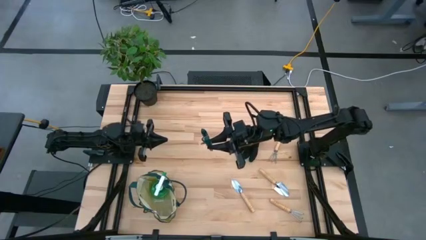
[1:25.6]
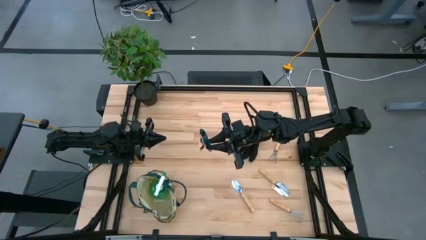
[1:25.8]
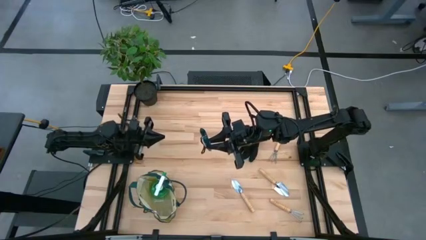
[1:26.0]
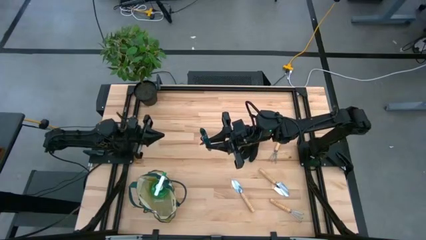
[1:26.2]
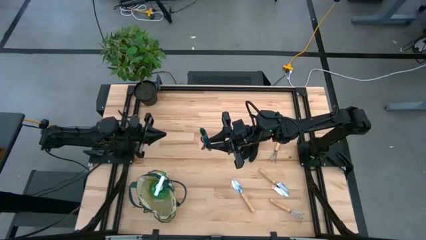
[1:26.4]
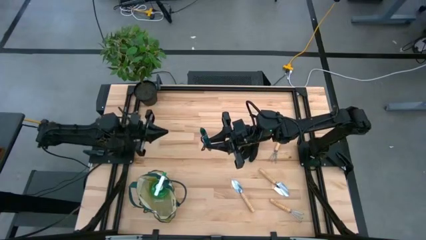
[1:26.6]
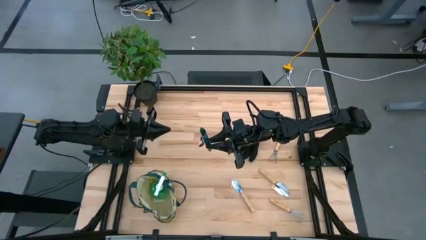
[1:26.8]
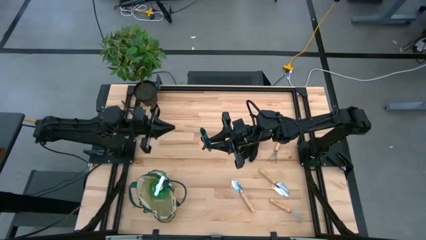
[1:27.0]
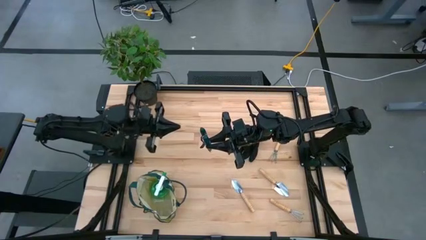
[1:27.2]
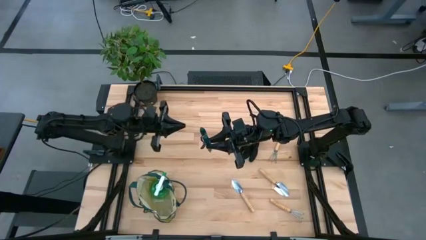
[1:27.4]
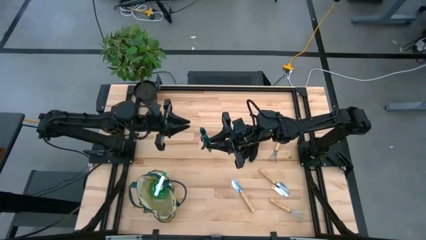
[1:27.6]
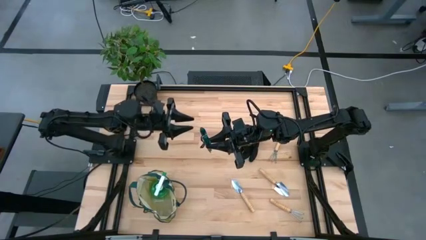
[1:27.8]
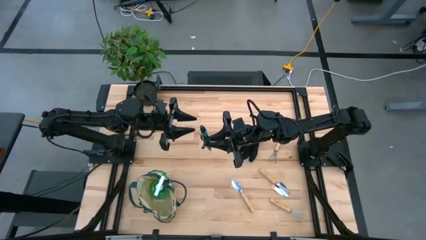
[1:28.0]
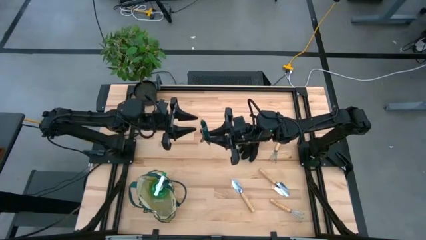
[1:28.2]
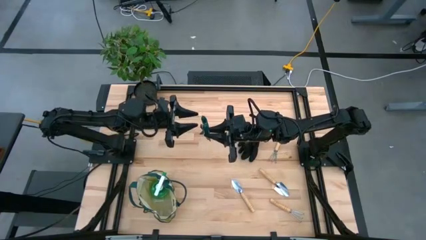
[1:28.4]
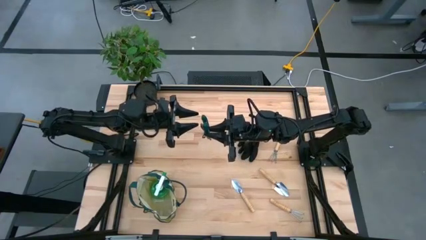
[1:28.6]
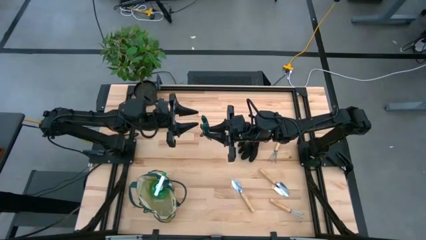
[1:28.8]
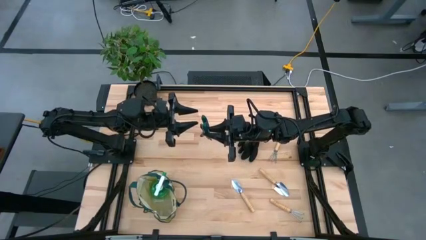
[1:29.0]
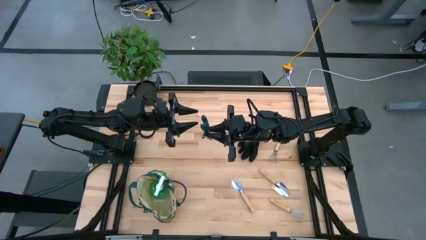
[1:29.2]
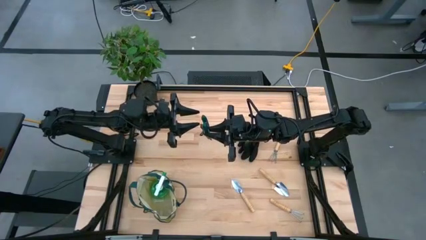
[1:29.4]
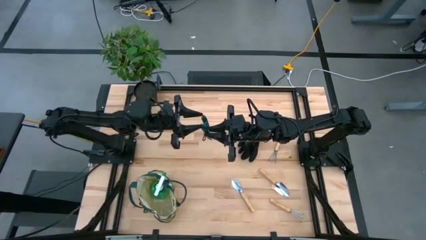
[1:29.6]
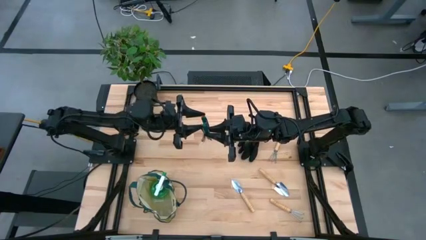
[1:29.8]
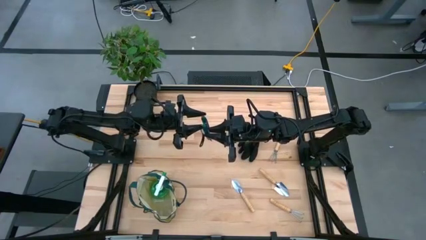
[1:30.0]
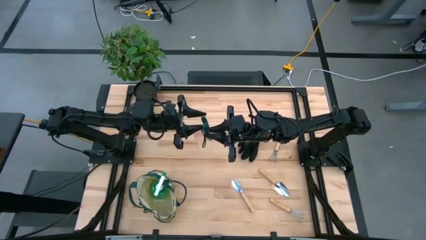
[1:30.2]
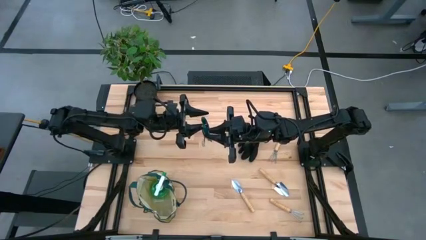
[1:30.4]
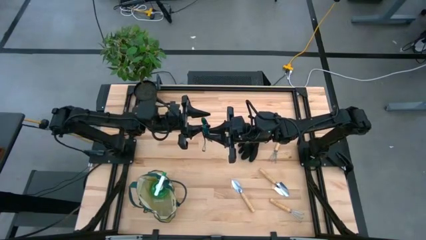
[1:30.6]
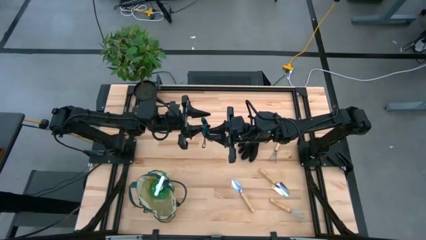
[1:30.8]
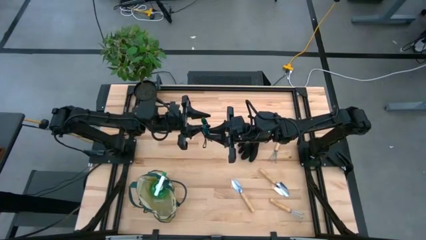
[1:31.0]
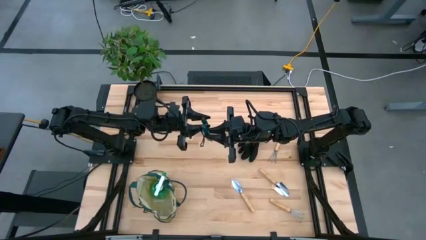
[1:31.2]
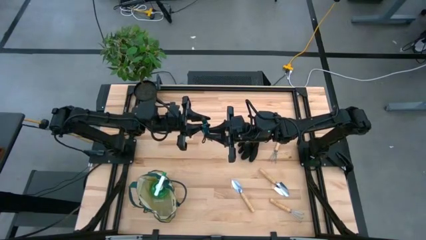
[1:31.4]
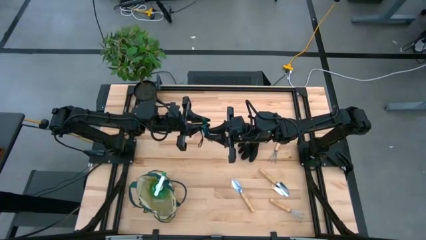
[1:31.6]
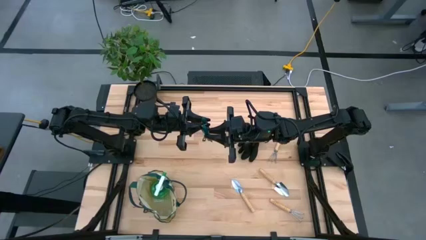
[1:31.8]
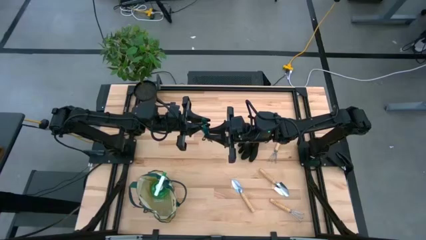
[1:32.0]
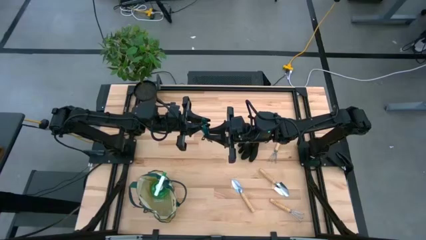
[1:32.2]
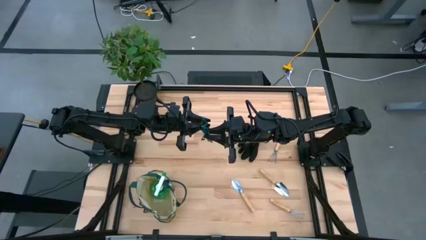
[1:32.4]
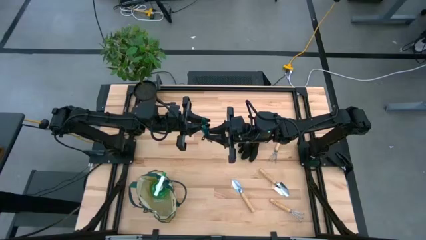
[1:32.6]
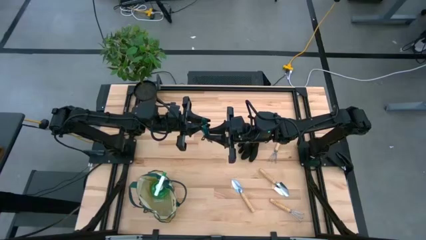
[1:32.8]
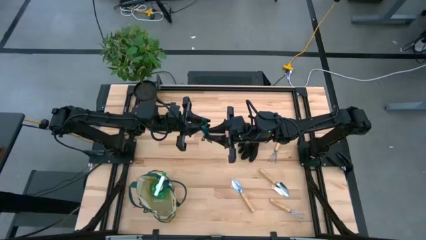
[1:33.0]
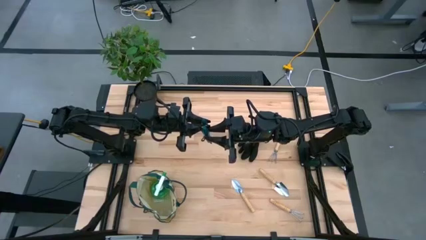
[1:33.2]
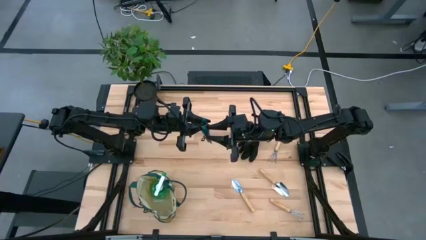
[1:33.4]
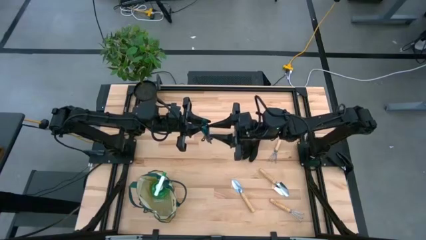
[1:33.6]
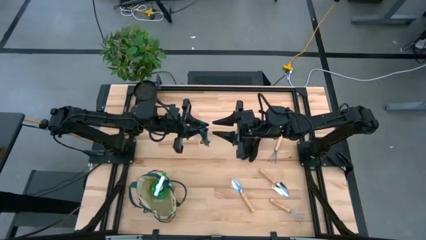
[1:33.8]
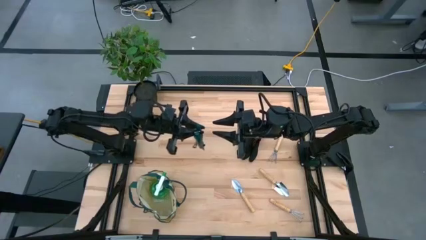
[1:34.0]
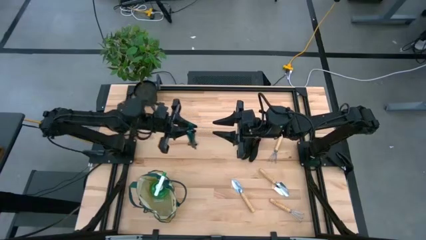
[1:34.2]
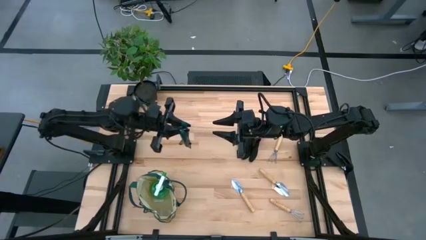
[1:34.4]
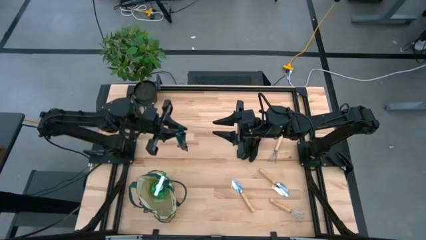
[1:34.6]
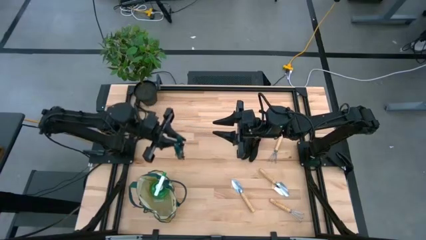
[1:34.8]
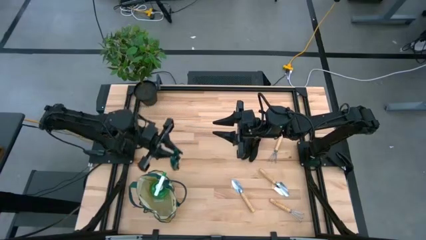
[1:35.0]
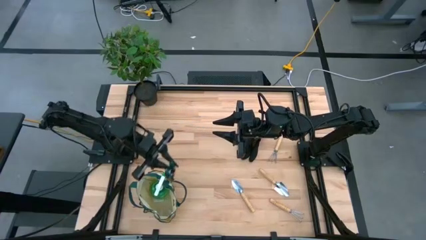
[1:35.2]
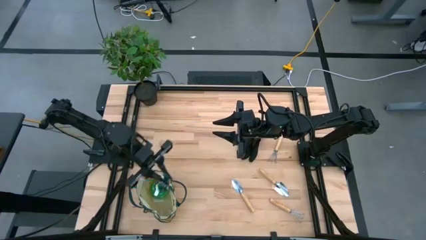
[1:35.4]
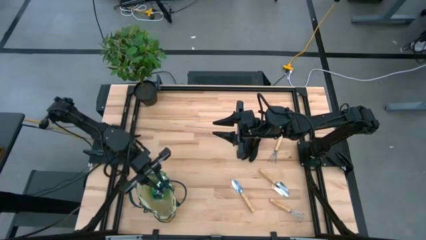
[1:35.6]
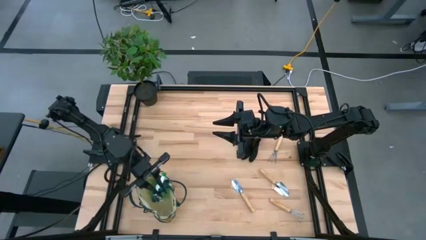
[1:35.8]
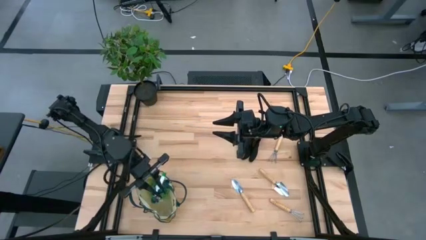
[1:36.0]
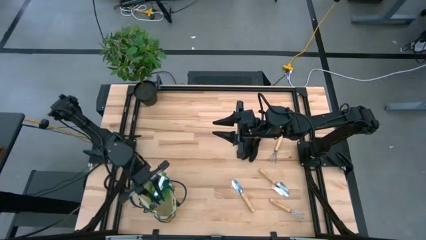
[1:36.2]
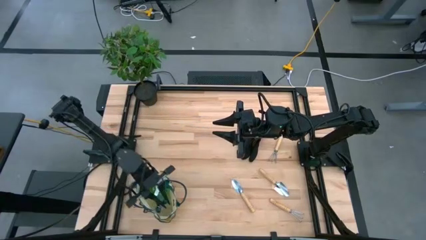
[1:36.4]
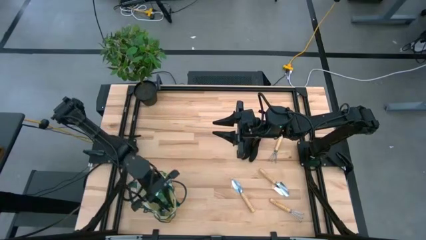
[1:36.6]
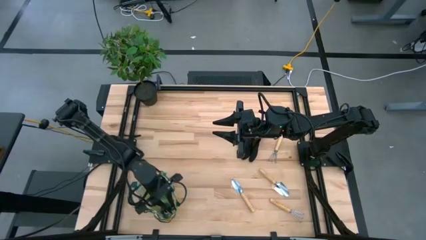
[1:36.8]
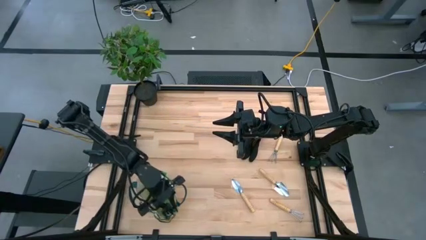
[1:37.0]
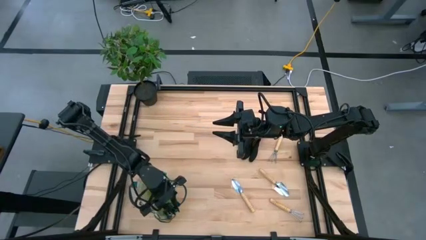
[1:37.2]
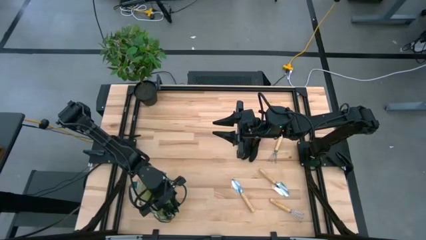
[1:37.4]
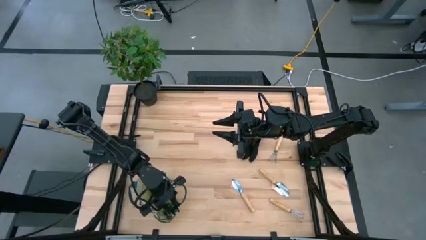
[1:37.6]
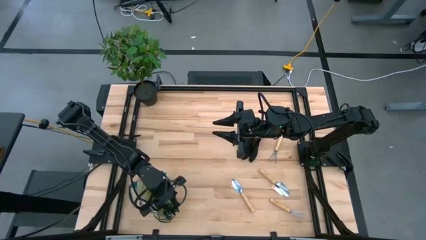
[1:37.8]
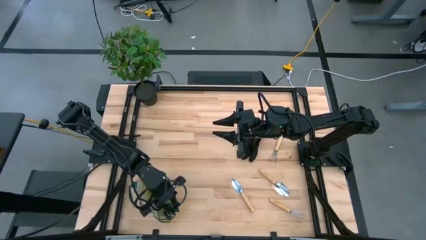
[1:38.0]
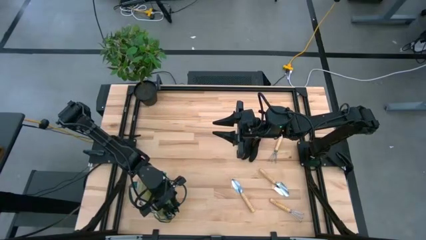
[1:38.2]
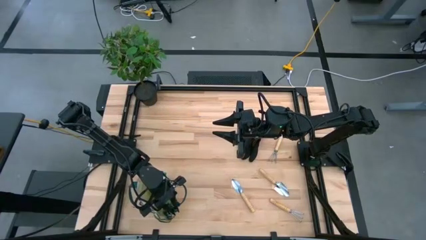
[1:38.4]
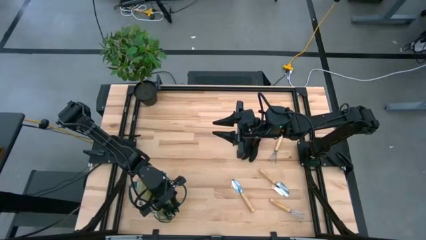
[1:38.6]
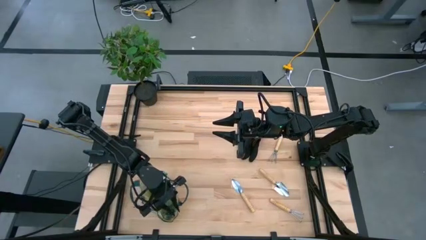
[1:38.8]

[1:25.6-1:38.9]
Task: Pick & Place Garden tools in Gardening bag
Put the shear scissors into the gardening bag
